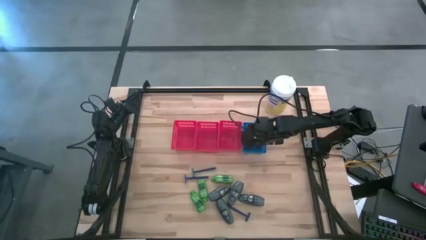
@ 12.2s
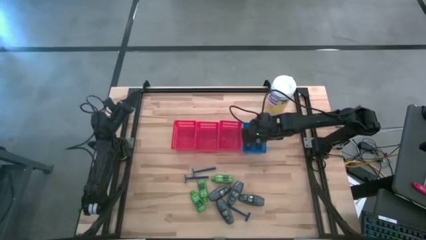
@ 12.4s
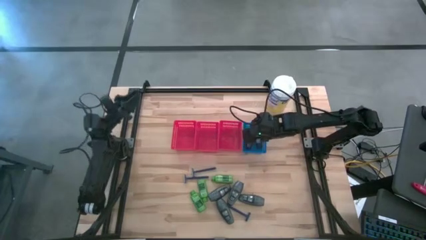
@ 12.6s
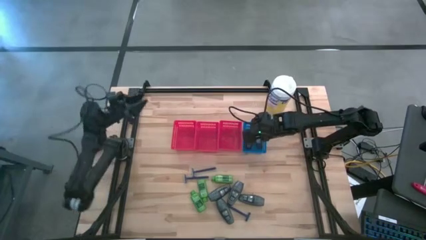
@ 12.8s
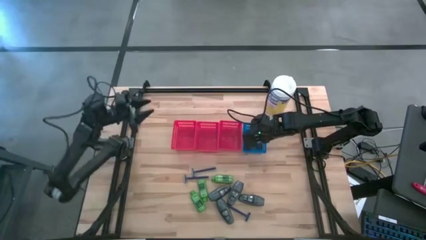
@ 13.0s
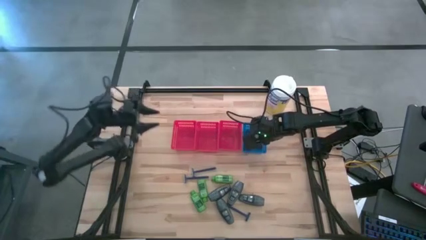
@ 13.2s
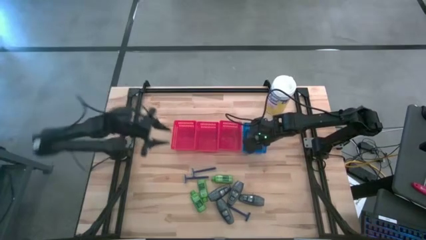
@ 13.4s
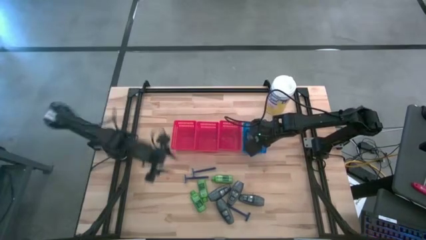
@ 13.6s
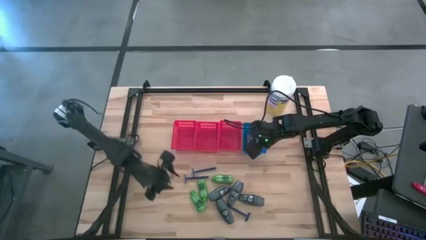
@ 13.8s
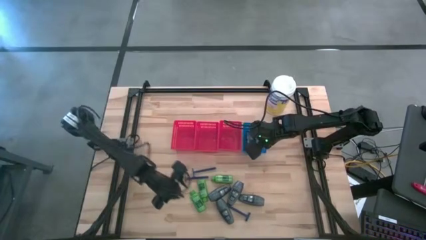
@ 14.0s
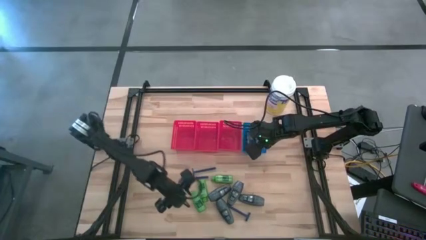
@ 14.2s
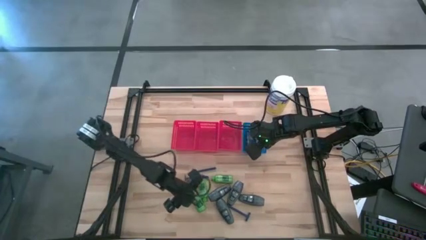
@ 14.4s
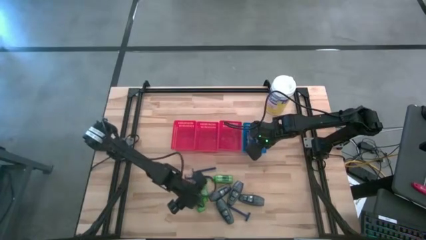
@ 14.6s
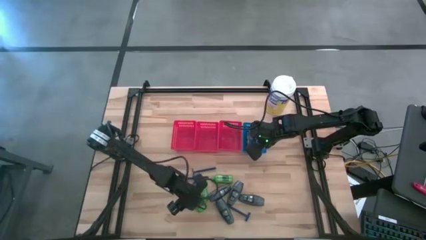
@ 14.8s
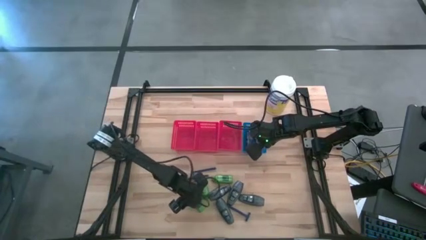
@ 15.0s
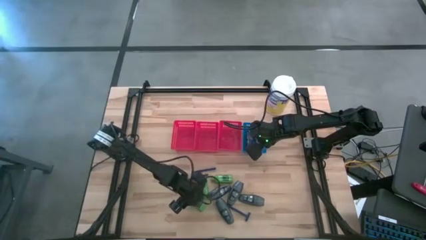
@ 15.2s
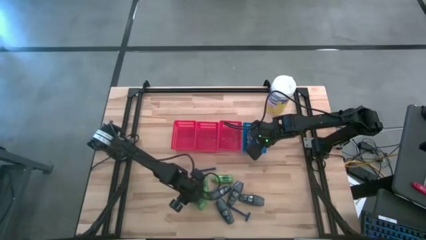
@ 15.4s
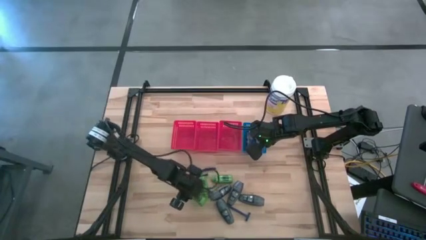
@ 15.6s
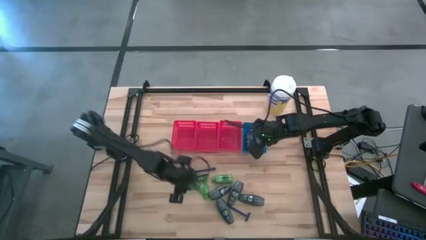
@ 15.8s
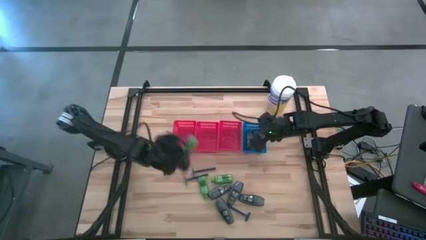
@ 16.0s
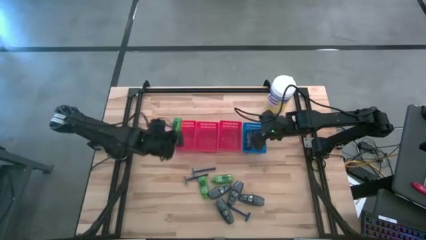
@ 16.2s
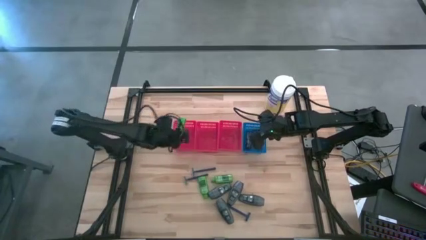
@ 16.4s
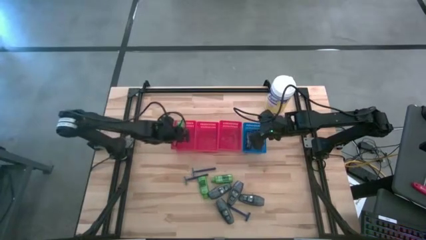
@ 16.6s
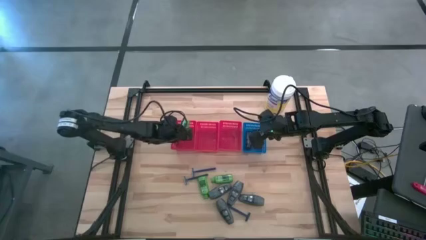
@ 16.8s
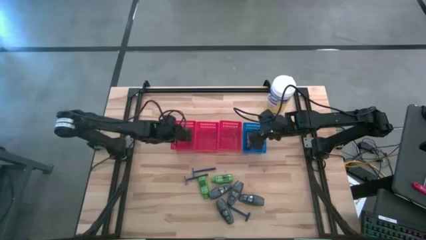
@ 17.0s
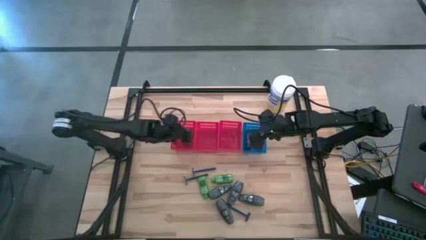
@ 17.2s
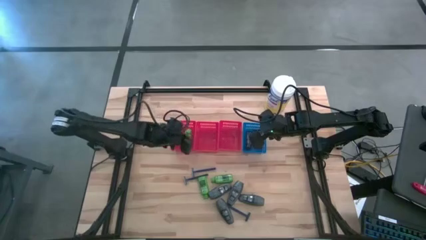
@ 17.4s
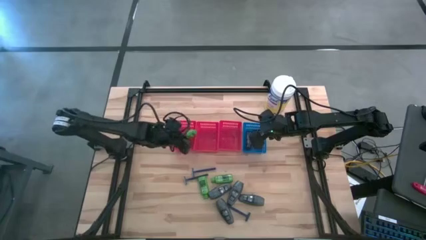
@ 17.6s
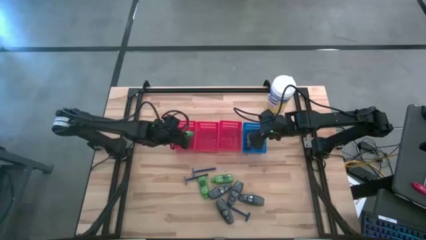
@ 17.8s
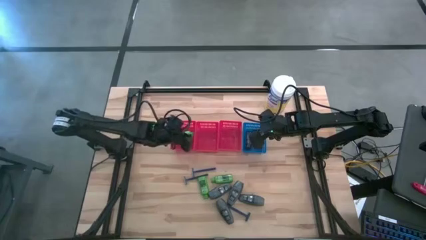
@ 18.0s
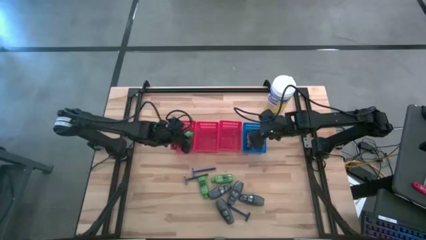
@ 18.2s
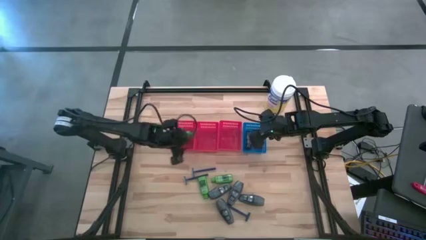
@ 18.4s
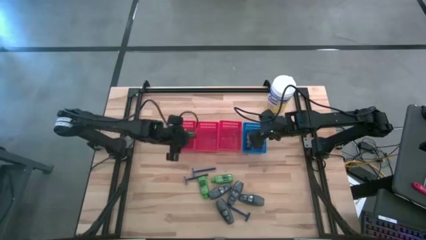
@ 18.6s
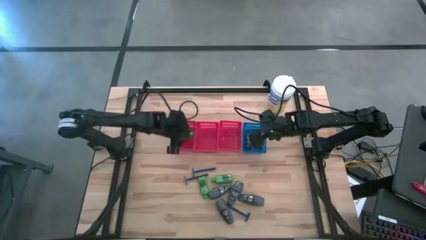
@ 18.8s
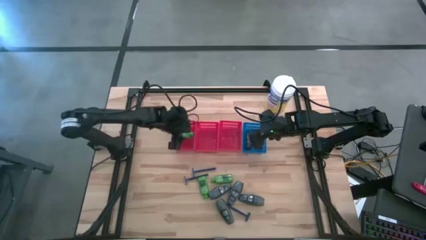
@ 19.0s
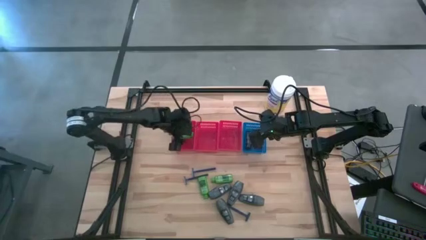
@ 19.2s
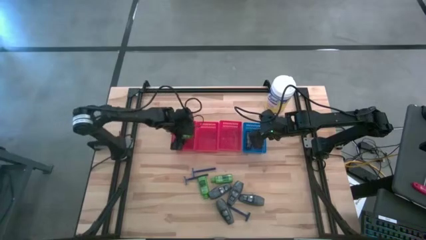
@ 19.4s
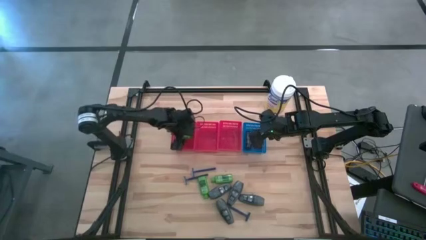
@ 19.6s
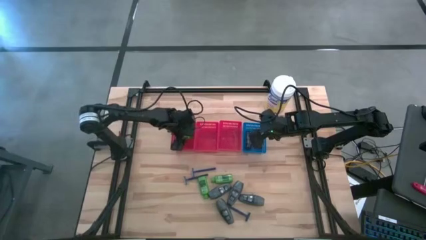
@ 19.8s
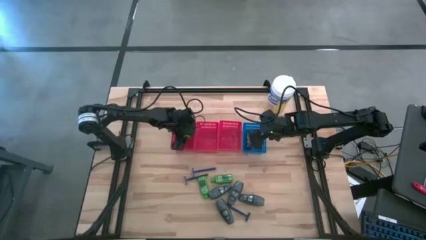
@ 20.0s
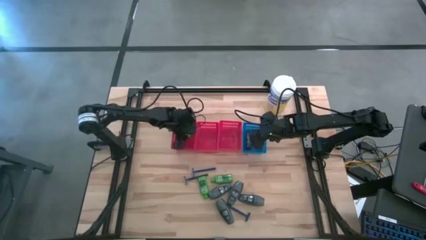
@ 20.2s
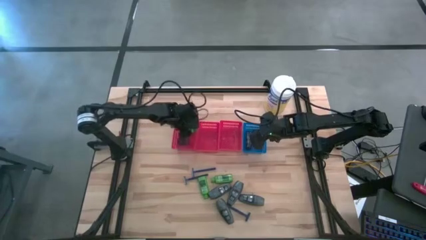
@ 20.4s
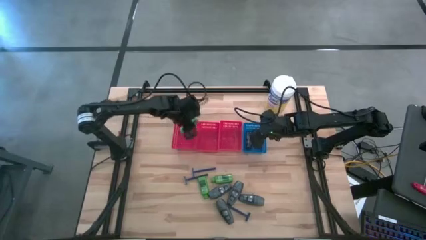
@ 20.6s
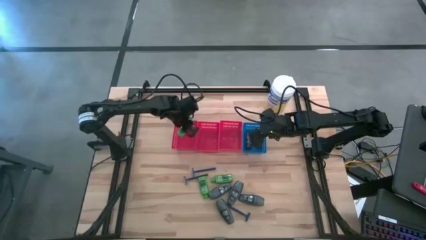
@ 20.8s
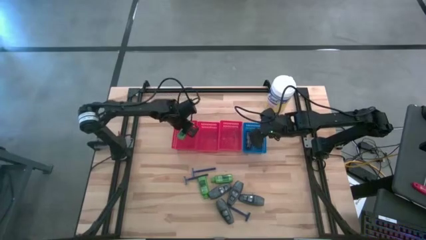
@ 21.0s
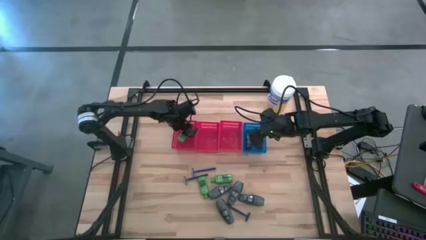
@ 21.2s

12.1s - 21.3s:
Task: Pick & Place Travel size toiletries
Put the green shampoo bottle into the left red bin

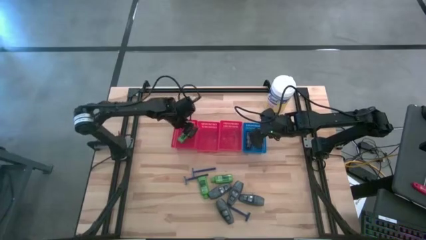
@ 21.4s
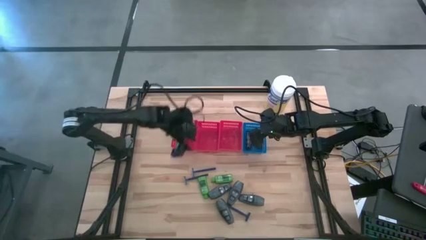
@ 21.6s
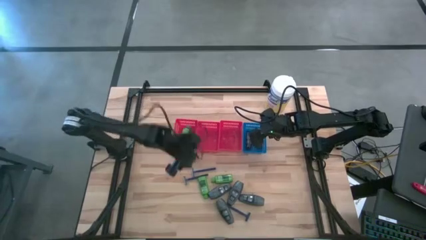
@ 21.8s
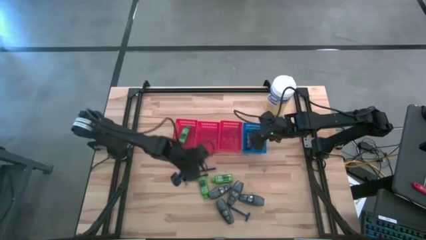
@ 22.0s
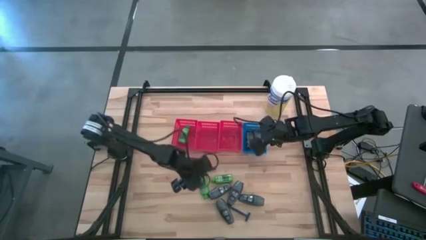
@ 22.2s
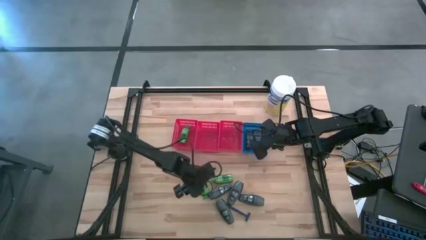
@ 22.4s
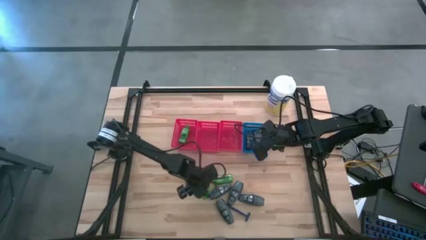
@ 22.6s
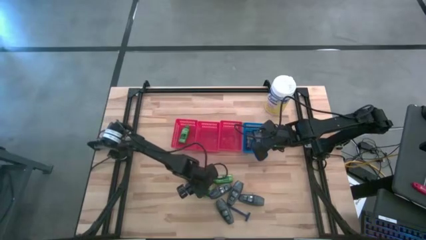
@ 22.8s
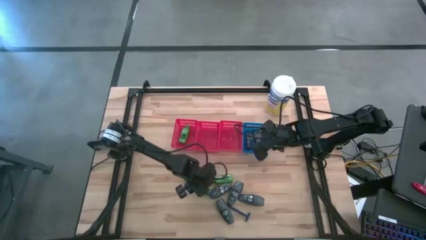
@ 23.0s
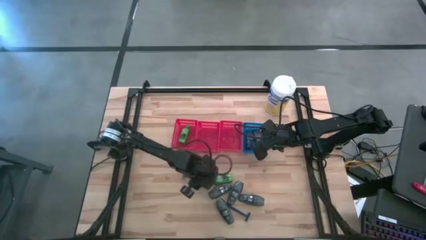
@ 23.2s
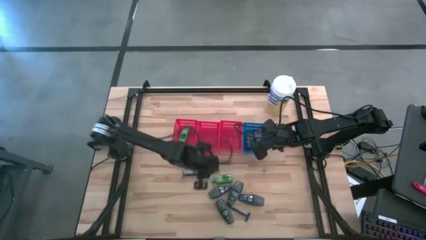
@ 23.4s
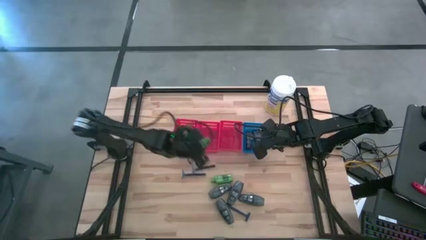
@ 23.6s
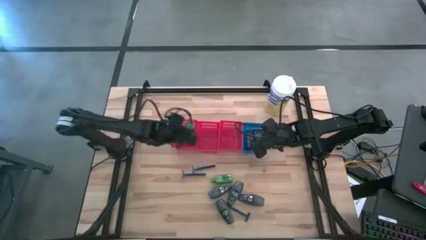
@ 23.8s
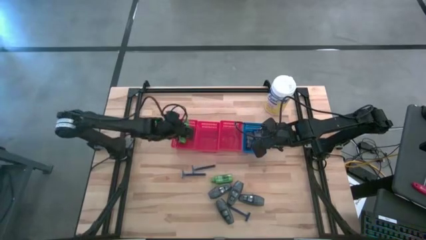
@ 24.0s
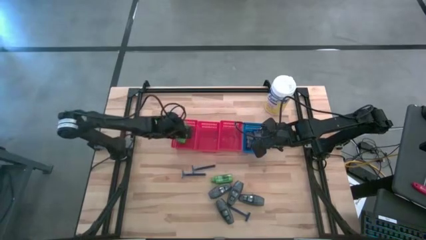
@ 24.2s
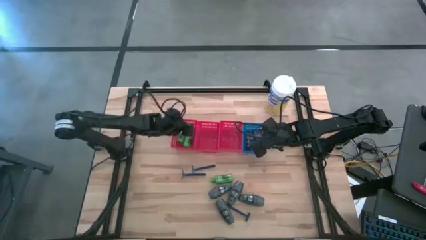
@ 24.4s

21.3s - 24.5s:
Put the green shampoo bottle into the left red bin

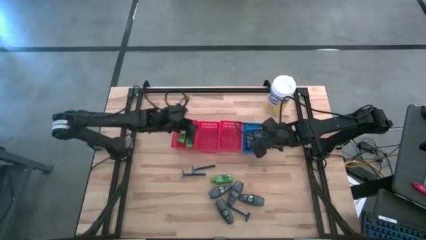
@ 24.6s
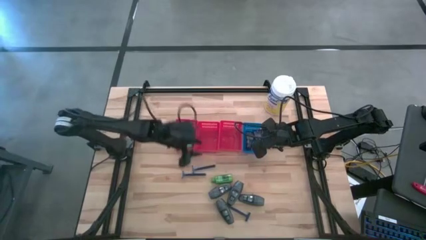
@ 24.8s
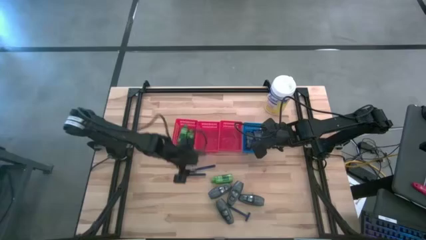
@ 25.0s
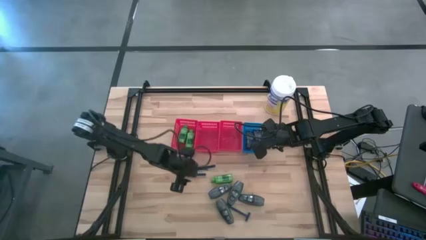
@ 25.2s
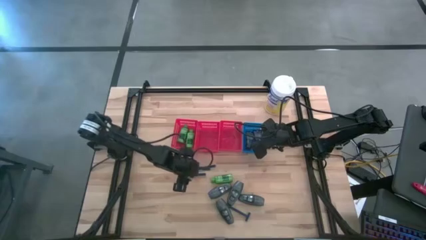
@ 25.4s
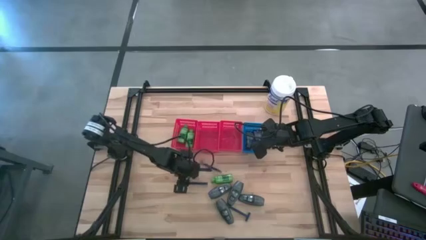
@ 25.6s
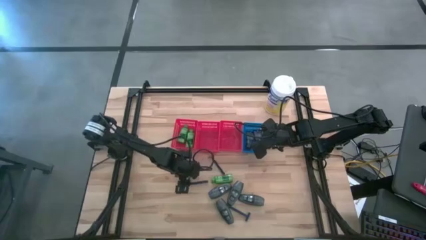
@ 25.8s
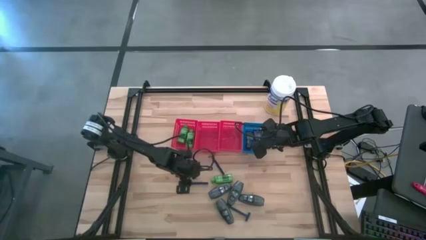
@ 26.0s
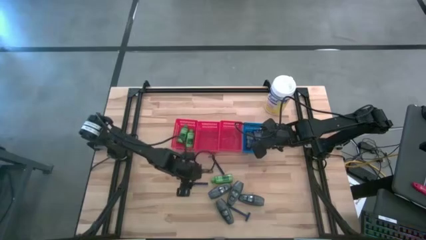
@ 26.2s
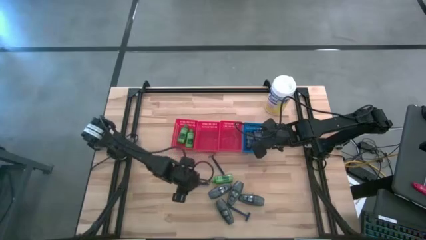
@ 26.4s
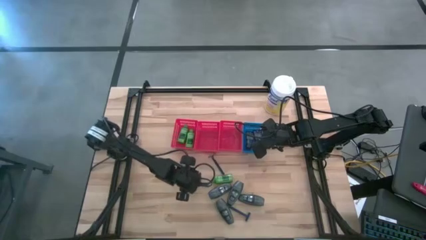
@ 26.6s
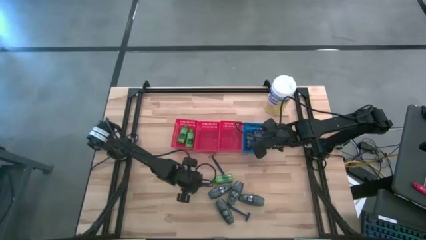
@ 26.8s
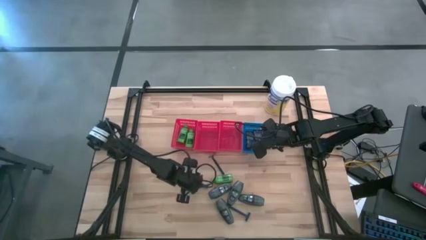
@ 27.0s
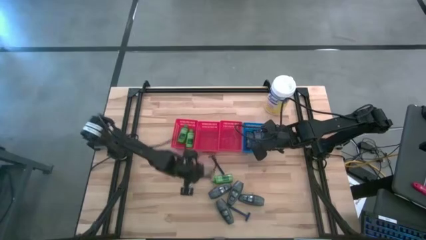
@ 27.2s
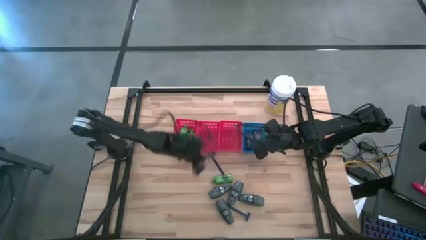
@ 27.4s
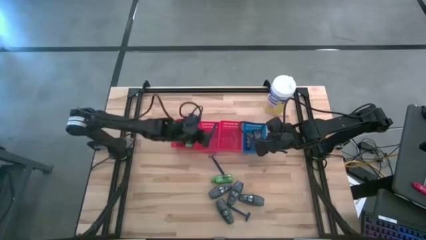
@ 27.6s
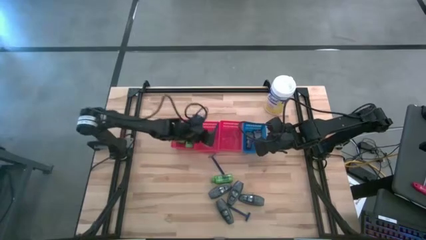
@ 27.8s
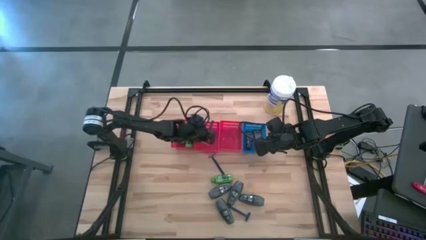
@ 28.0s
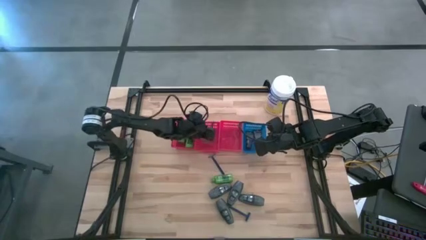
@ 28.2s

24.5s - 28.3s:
Put the blue razor into the middle red bin
